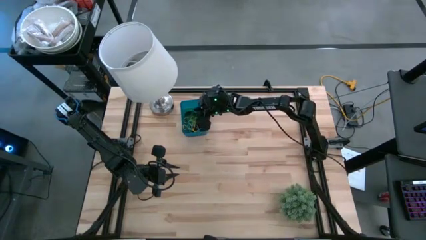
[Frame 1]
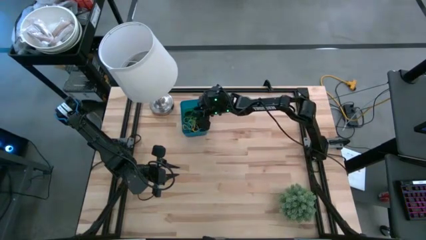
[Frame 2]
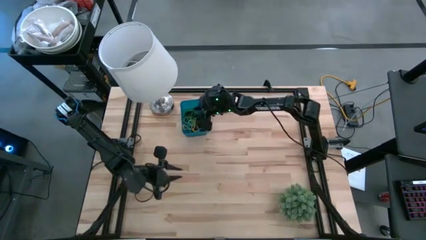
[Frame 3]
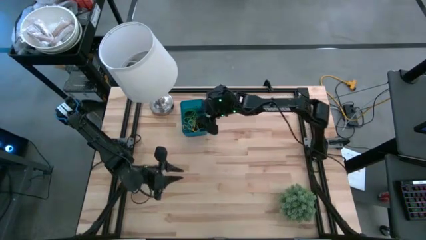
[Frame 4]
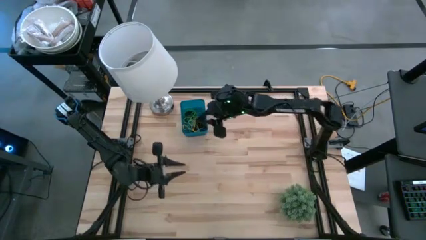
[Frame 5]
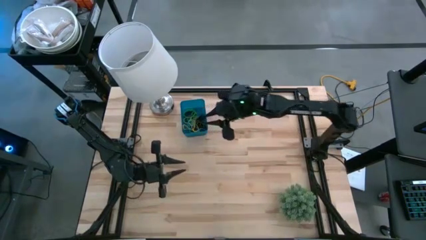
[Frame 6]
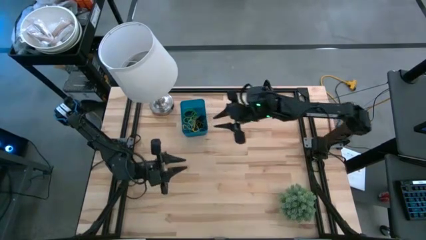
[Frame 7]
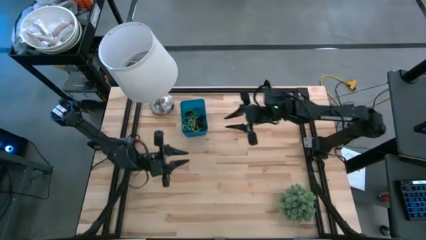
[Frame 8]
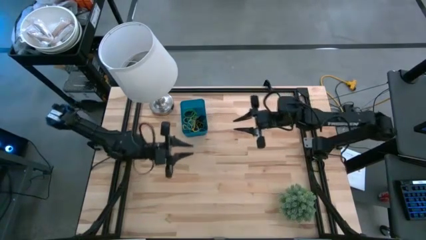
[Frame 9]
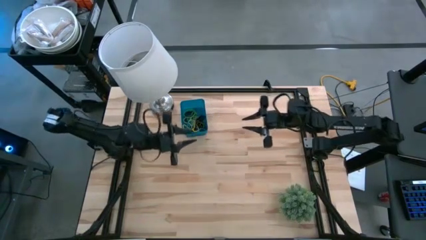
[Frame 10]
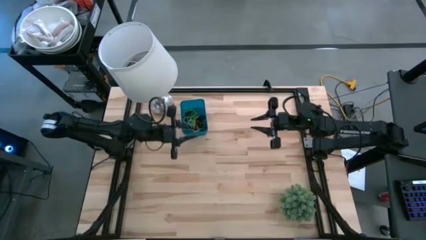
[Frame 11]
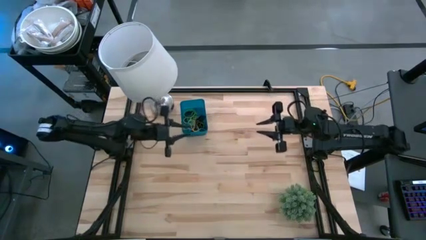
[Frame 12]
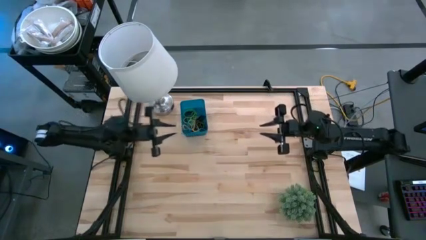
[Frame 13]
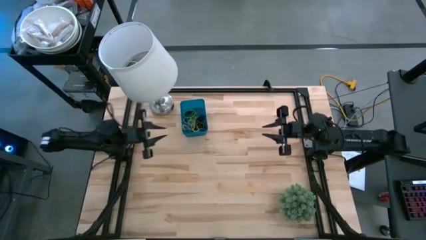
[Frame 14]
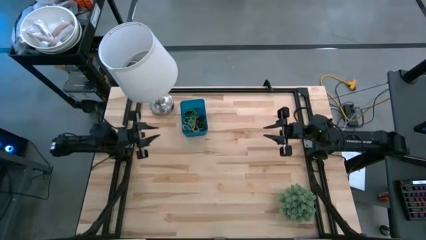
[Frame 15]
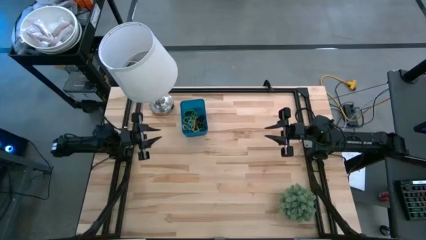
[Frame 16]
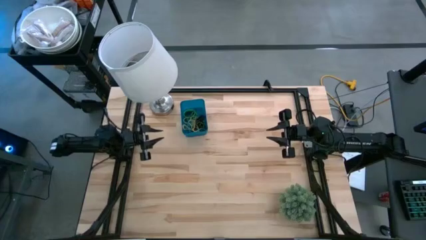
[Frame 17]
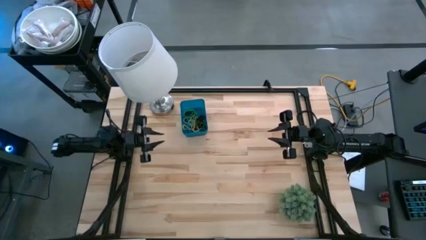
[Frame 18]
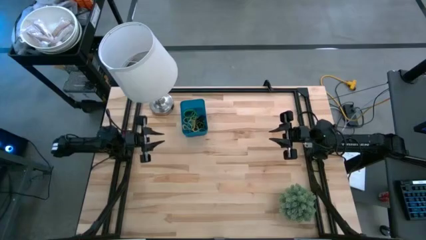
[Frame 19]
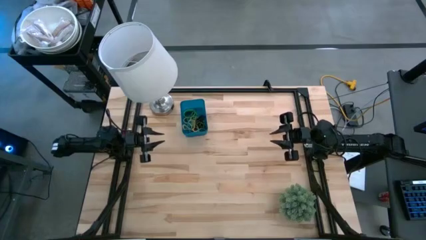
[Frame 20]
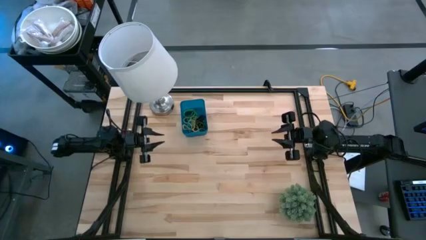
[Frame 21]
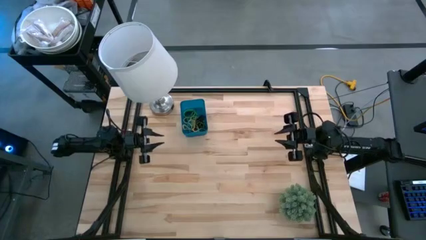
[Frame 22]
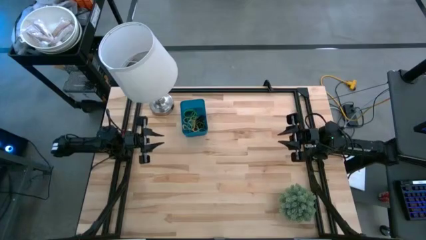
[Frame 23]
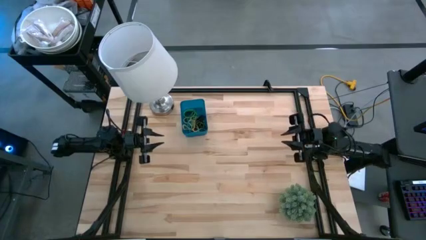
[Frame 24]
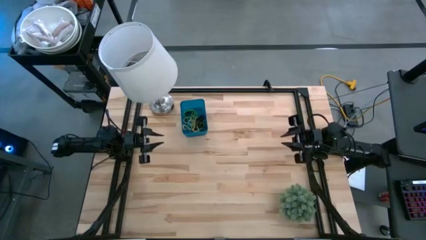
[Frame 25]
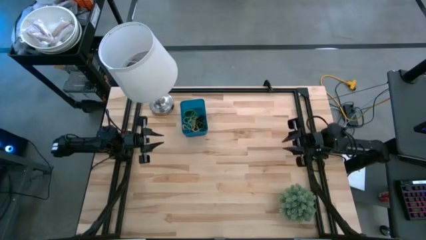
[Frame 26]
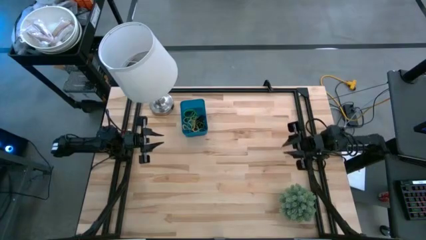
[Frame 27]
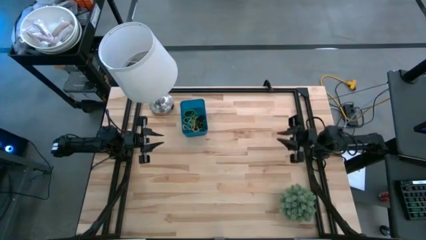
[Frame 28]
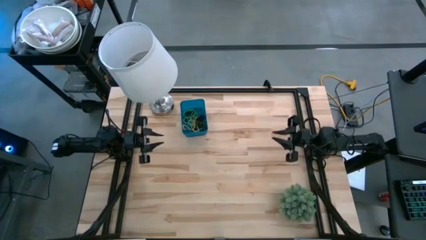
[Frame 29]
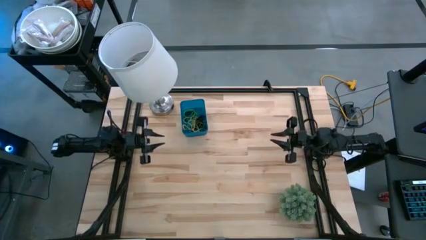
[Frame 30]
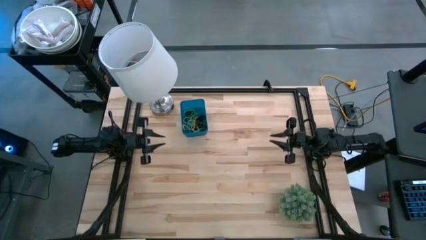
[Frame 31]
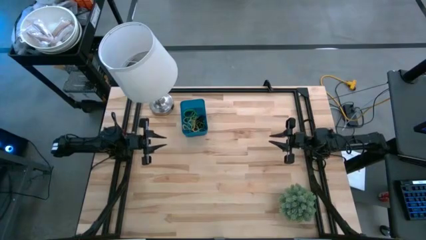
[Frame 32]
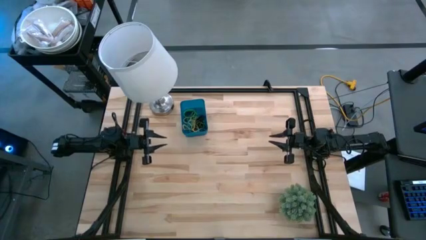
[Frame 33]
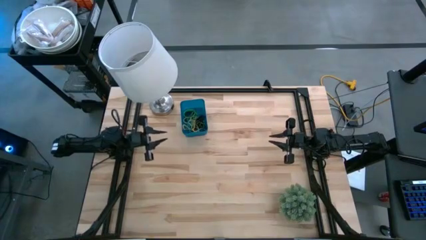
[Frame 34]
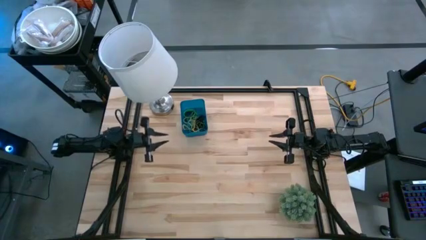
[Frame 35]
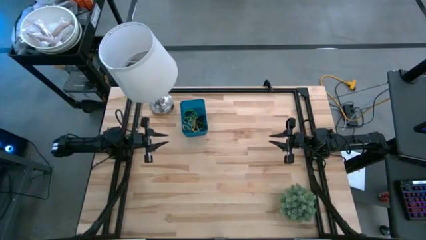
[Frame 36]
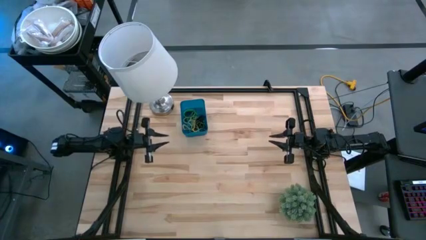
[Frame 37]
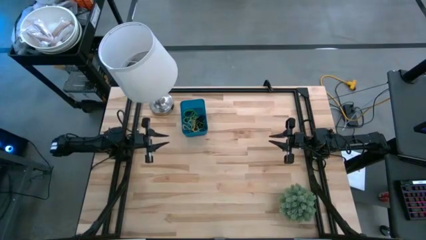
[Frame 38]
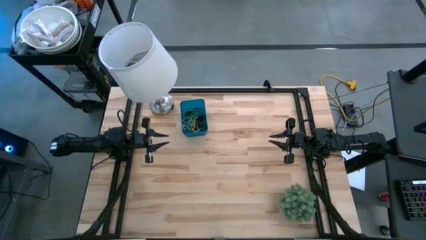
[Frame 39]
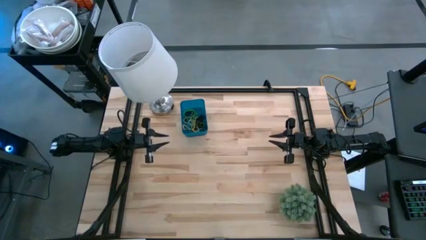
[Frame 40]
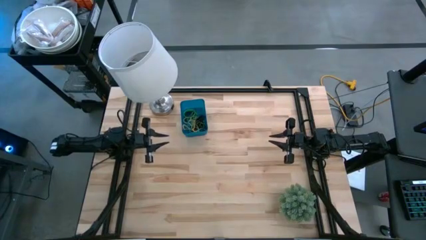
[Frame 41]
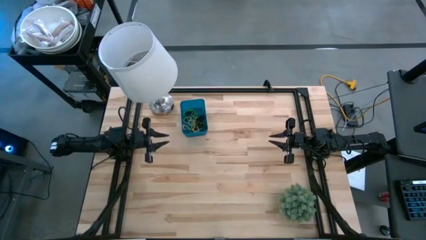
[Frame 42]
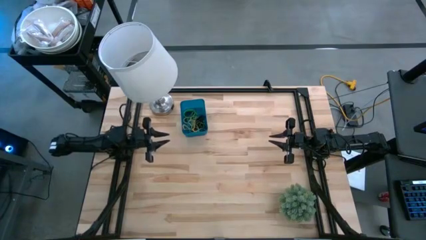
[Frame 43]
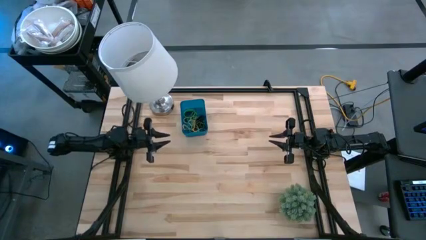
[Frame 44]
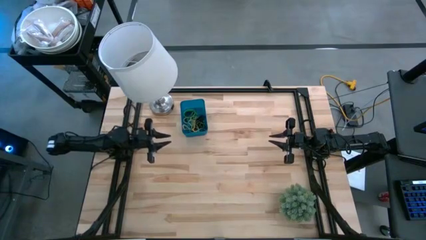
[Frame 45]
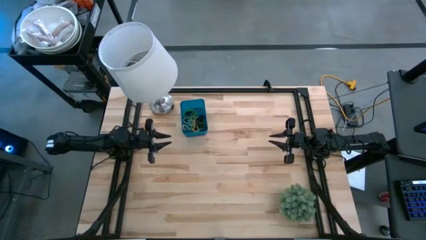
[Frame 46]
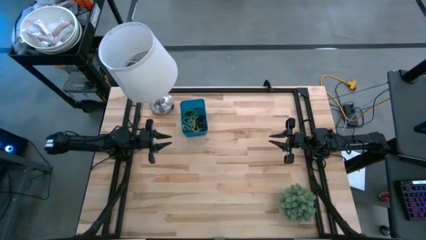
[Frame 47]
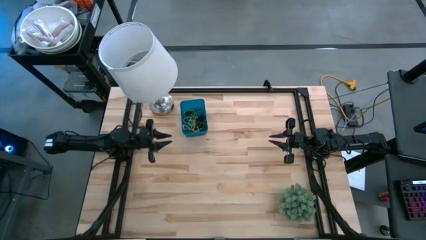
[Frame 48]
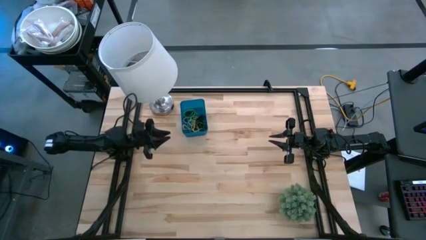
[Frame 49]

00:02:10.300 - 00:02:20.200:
Task: Pick and place rubber bands into bin
Return to Home Position

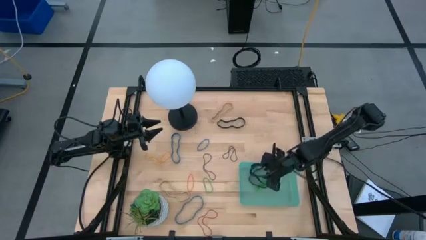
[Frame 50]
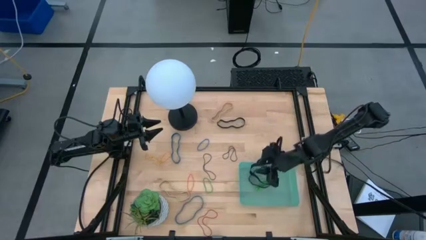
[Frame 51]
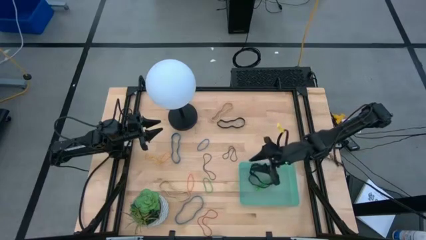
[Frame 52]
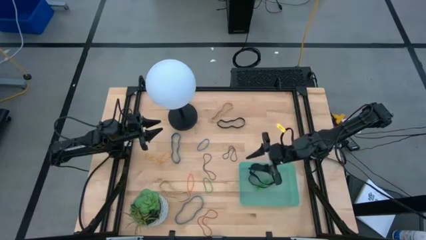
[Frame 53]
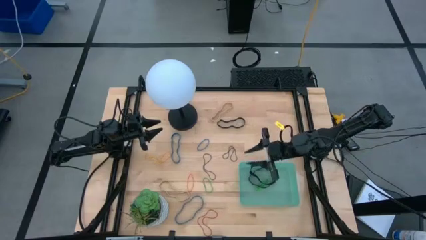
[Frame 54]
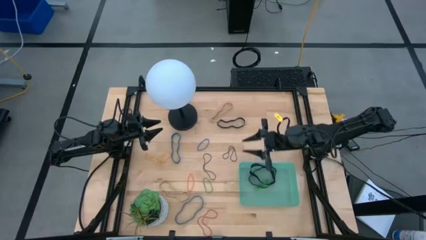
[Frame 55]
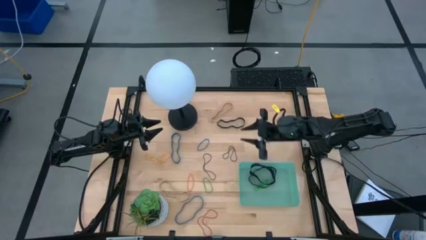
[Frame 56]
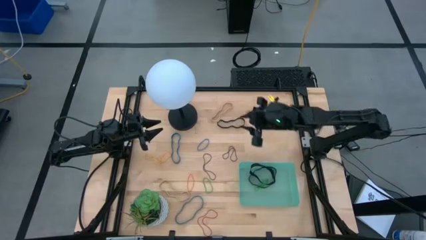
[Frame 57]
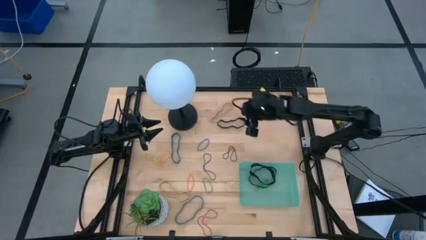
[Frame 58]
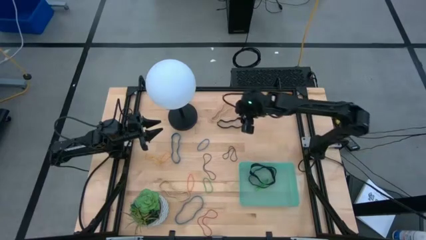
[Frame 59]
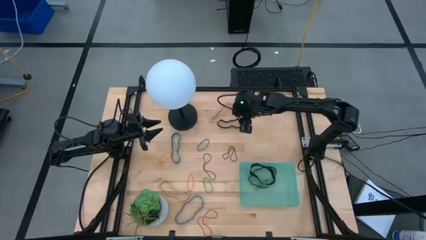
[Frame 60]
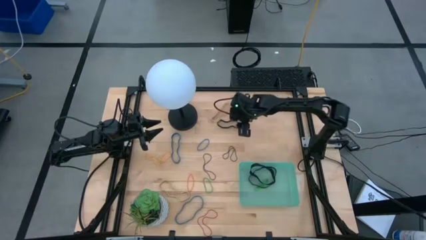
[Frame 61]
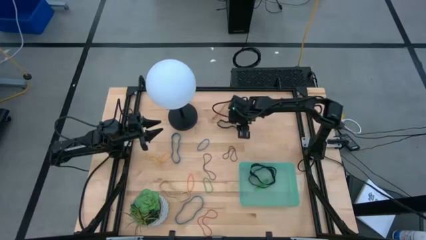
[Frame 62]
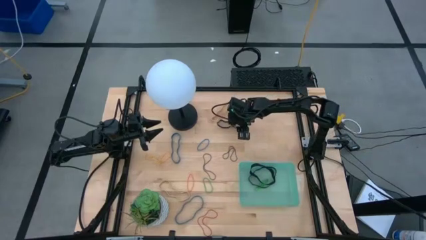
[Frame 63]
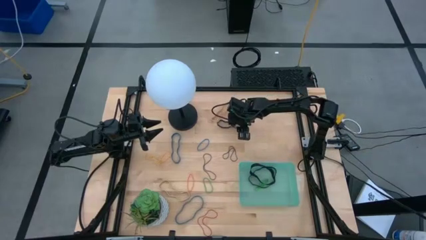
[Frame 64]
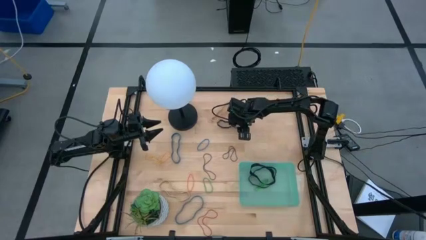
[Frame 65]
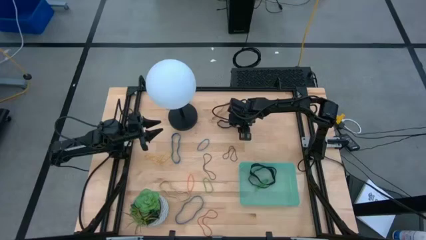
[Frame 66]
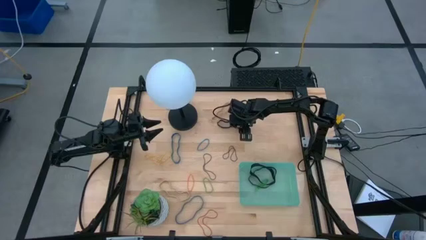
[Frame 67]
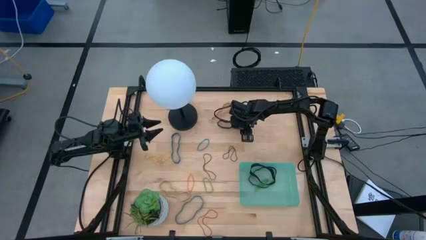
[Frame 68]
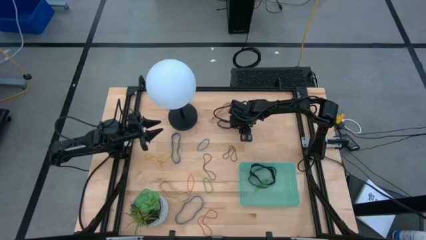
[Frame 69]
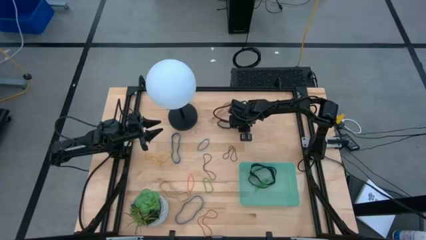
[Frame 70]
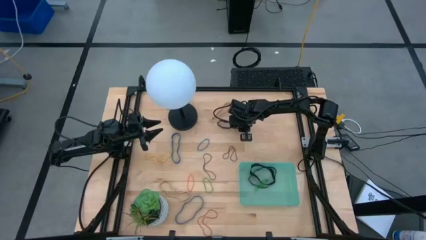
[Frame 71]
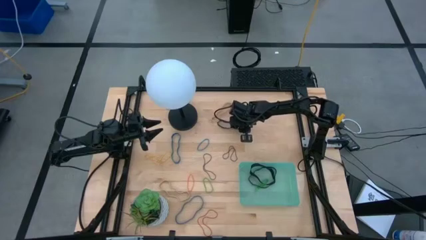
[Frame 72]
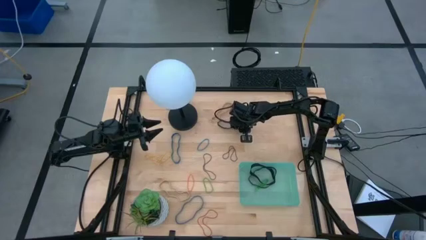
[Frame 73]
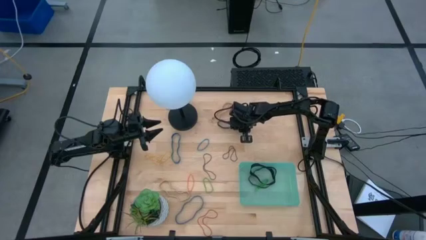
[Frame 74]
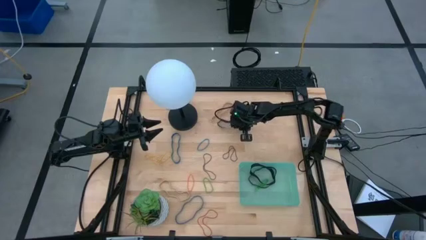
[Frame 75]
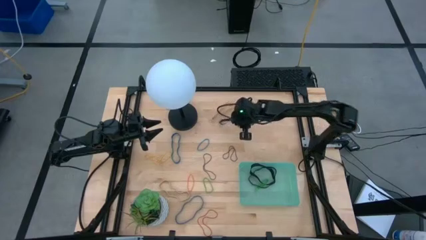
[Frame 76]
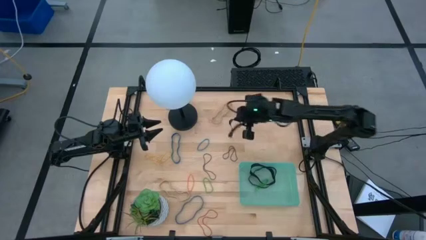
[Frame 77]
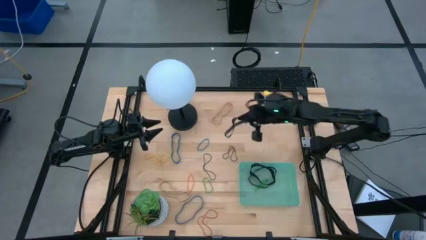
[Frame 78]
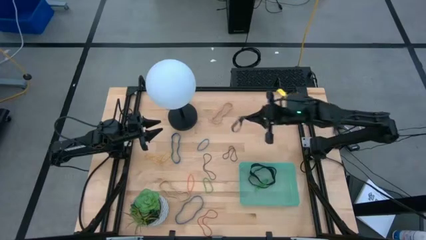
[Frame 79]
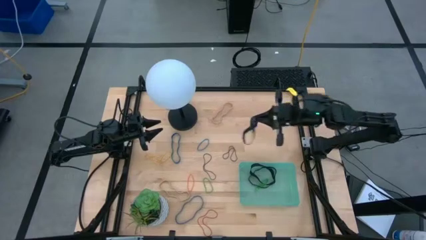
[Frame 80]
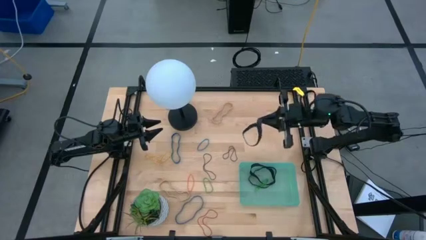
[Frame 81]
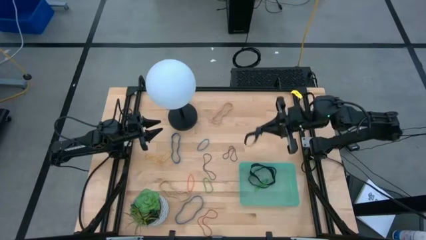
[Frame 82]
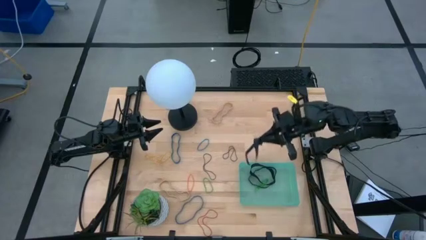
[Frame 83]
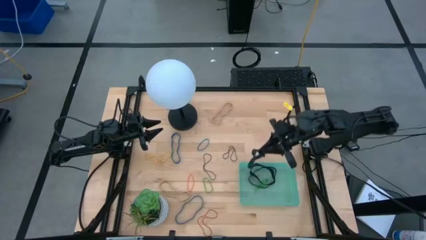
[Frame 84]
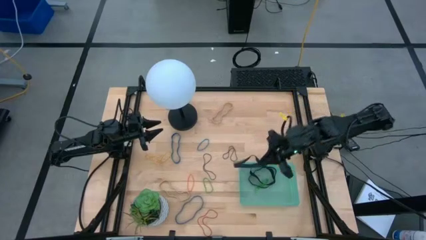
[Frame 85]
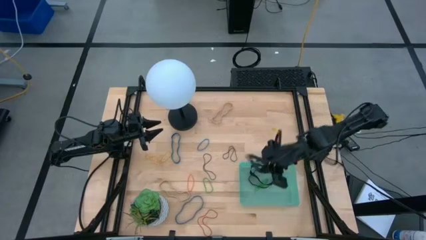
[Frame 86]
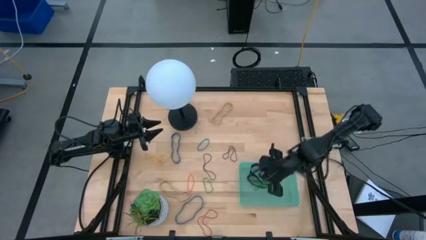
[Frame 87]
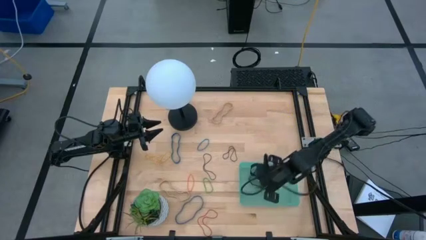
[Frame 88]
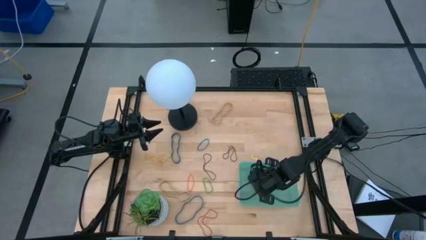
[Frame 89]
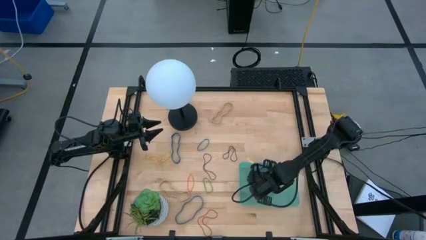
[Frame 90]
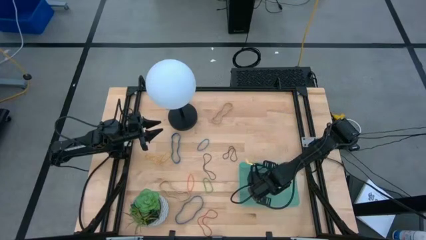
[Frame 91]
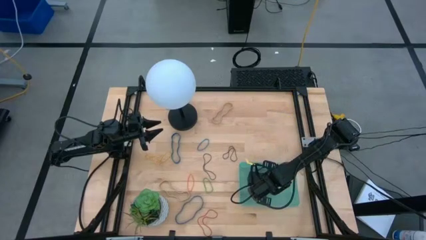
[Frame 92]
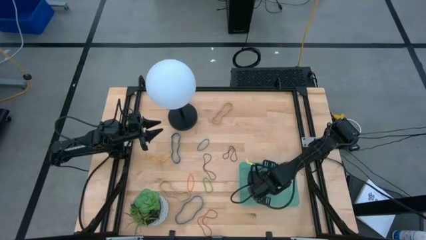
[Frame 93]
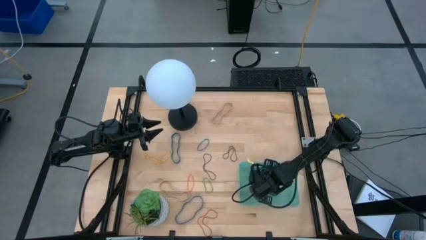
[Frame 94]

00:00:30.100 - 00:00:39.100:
Task: Pick and place rubber bands into bin
Put the black rubber band into the green bin
